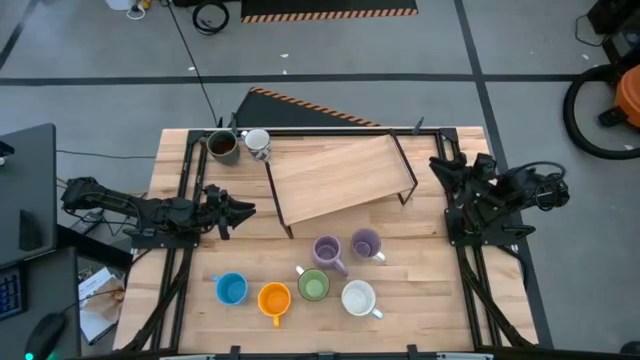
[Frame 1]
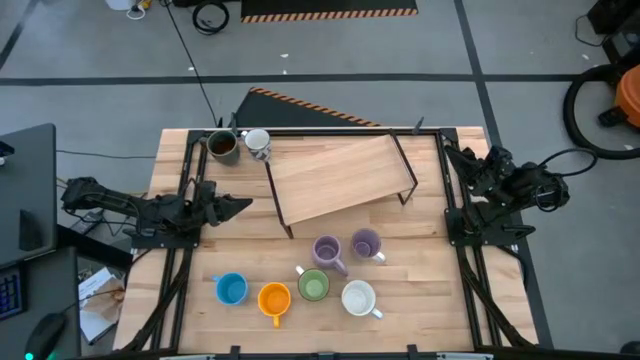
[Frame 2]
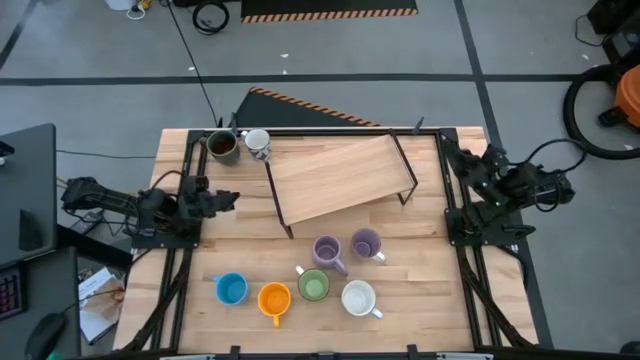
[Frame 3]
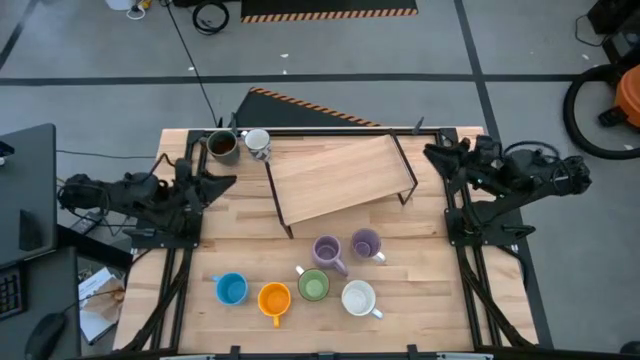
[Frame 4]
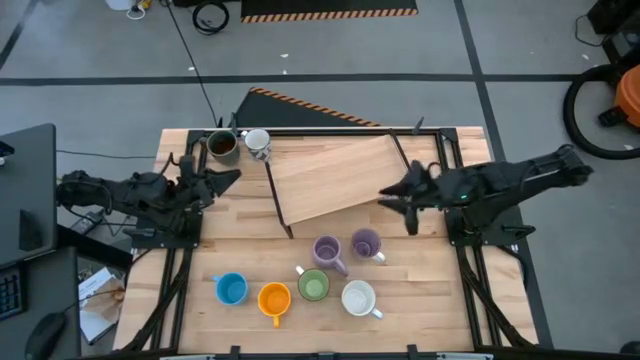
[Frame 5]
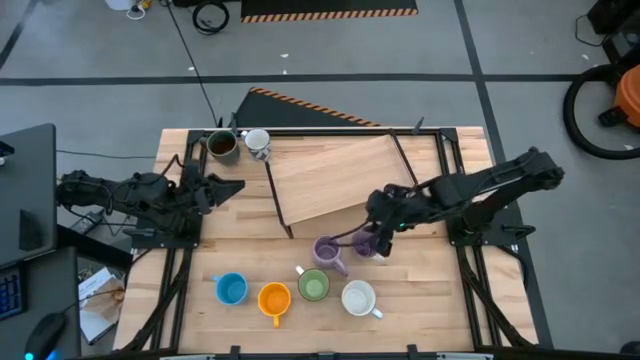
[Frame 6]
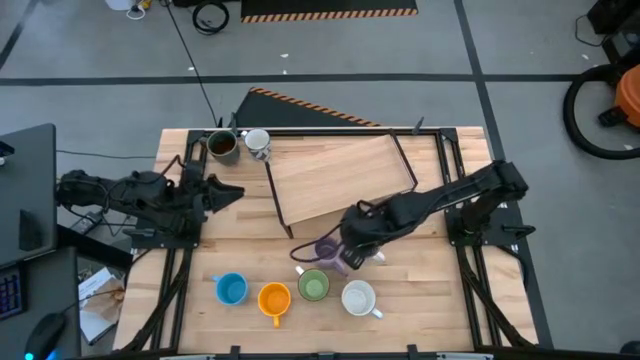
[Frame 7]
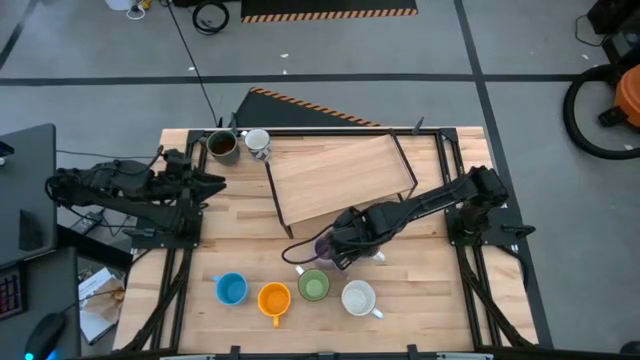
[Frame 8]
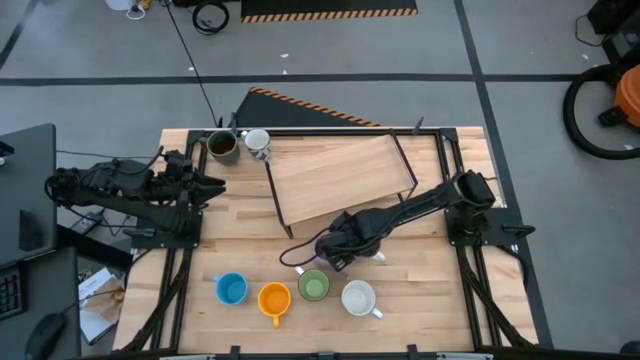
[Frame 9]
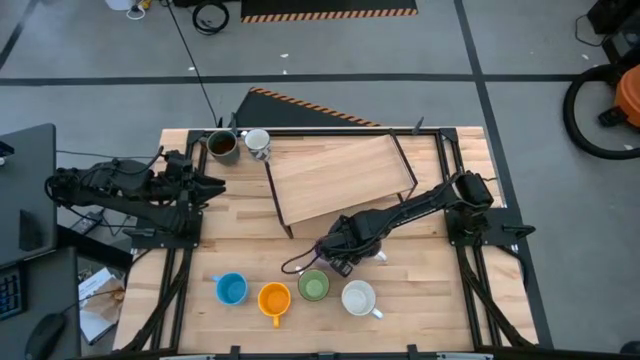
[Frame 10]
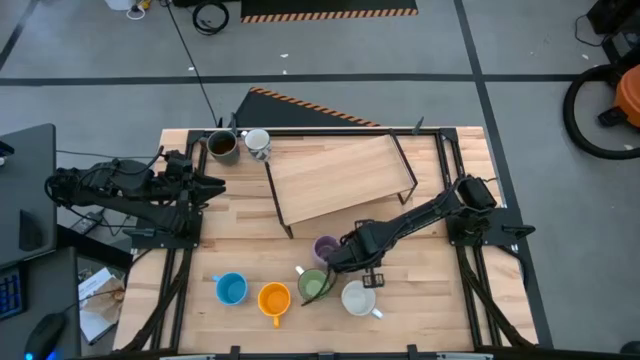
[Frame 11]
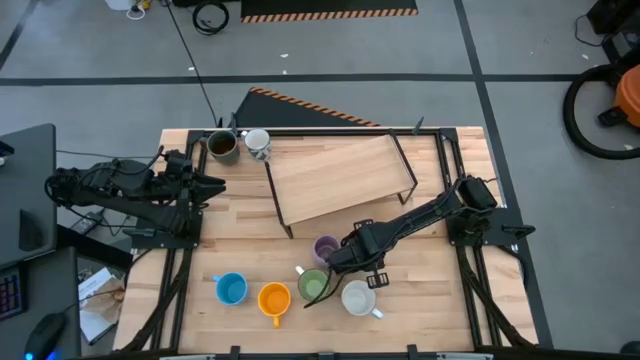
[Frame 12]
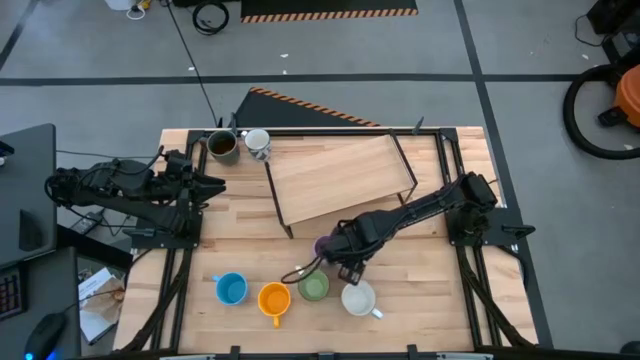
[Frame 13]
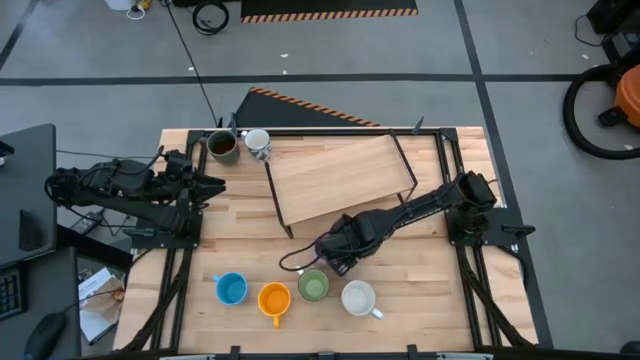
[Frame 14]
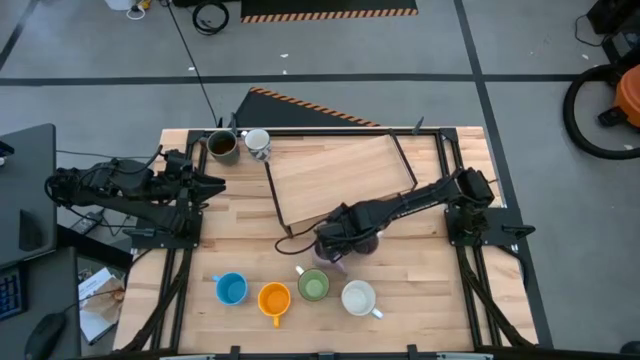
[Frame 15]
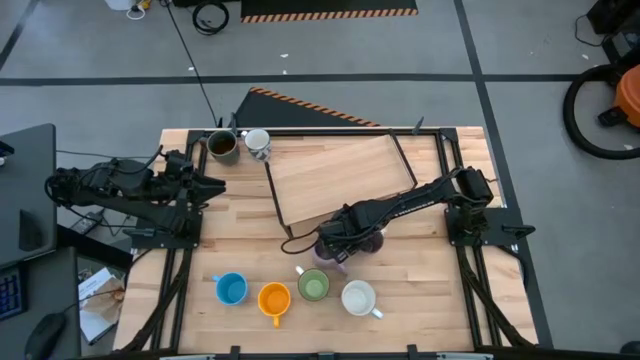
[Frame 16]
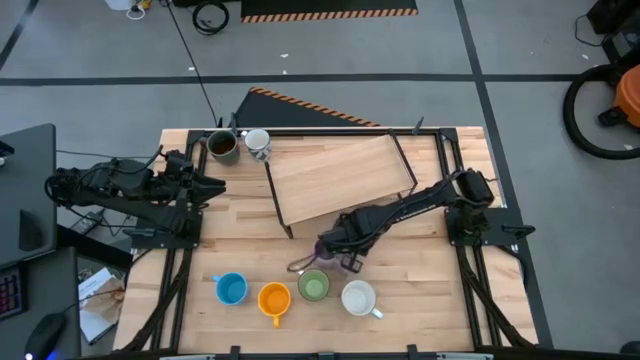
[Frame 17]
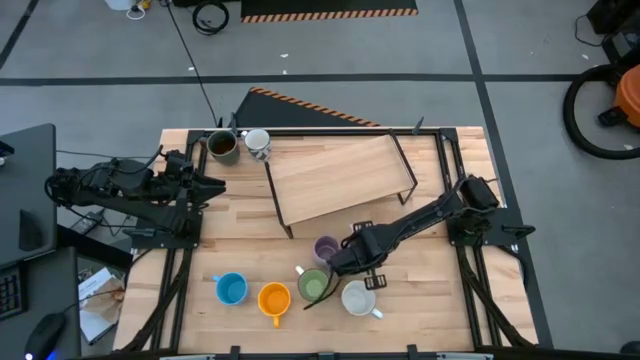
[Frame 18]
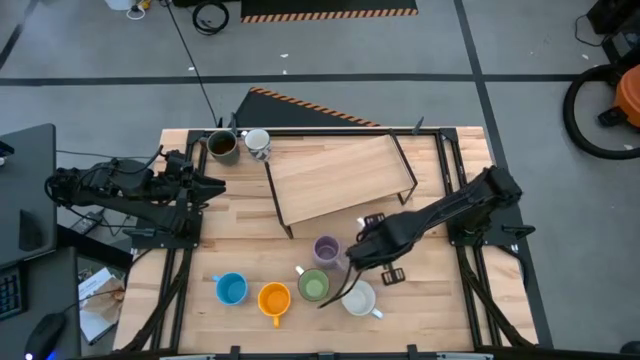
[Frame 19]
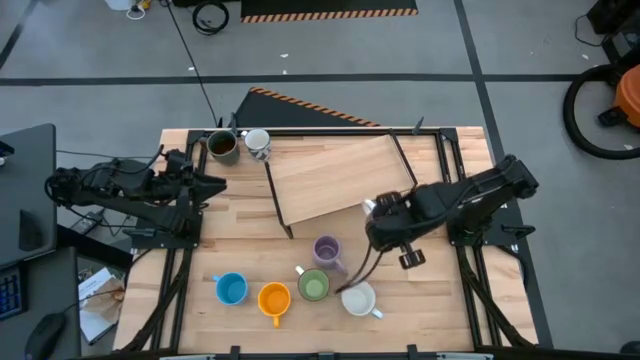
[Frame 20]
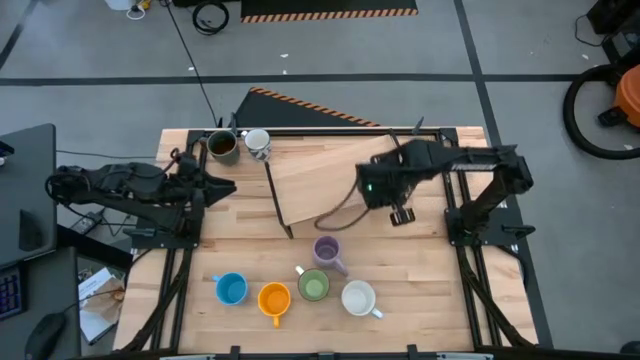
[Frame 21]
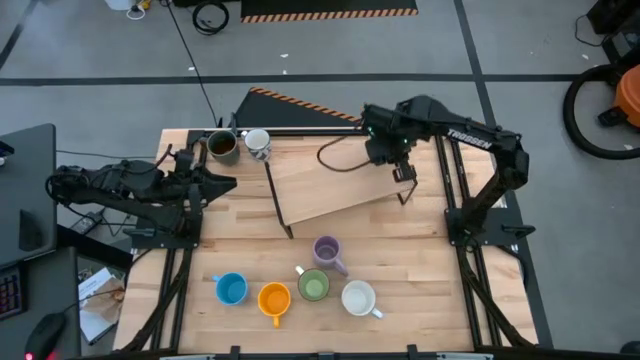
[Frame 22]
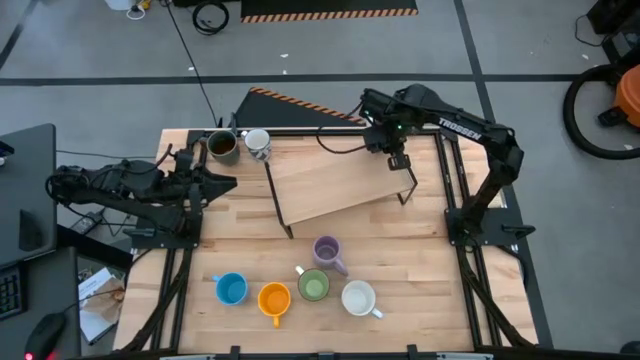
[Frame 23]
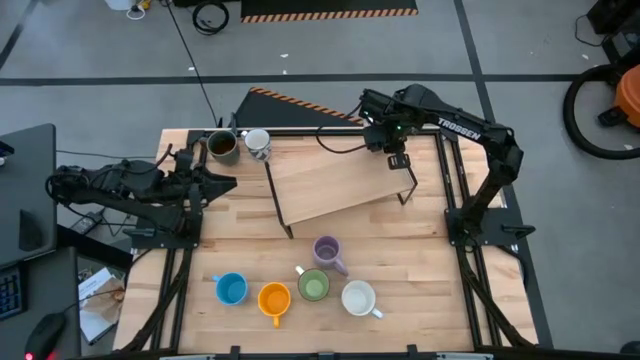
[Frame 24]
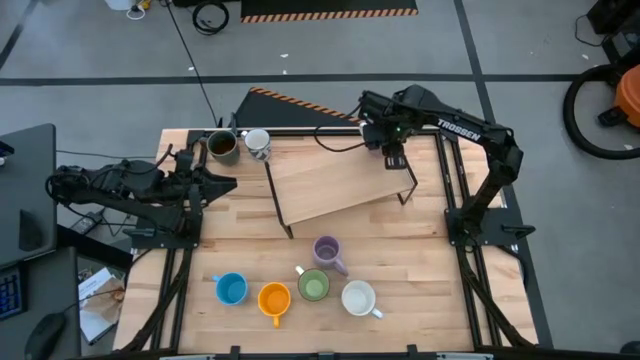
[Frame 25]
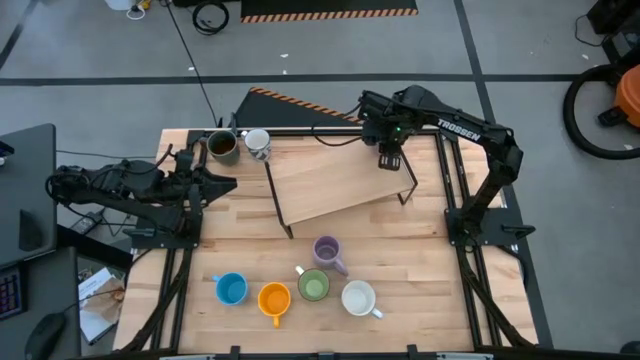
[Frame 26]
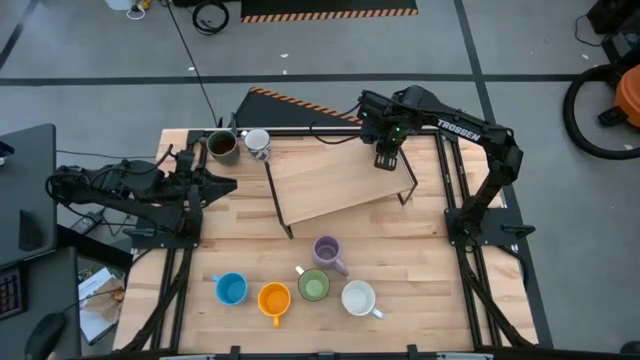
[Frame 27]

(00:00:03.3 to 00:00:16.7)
Task: Place coffee mugs
Put the purple and white mug on the shelf

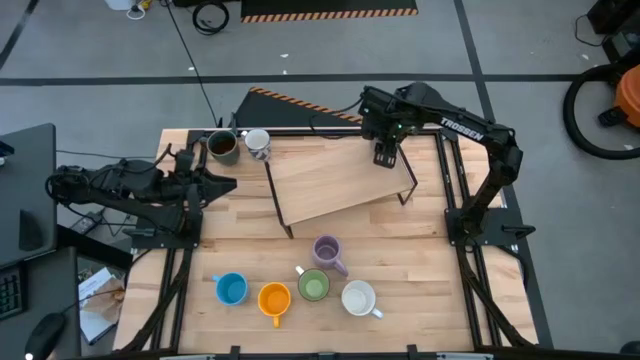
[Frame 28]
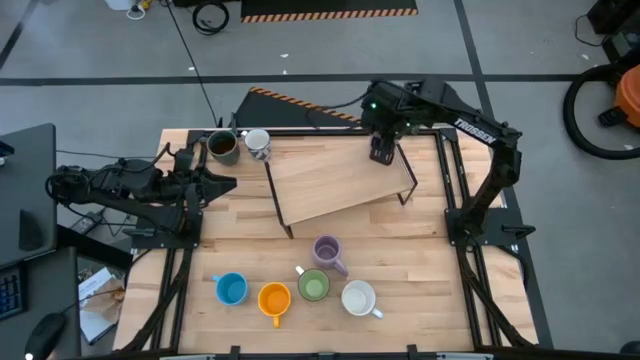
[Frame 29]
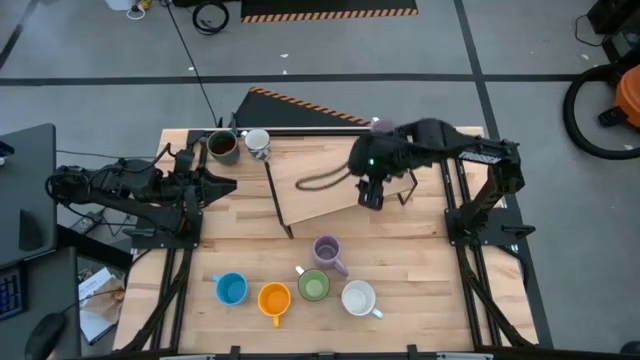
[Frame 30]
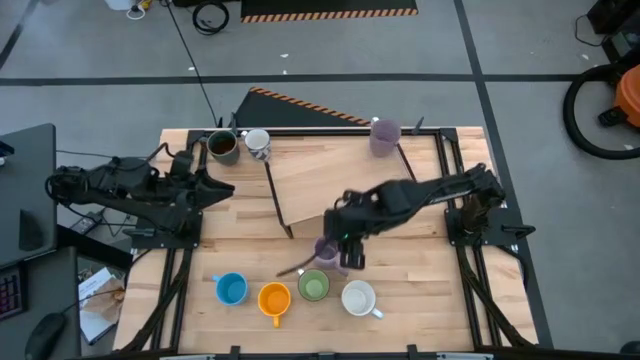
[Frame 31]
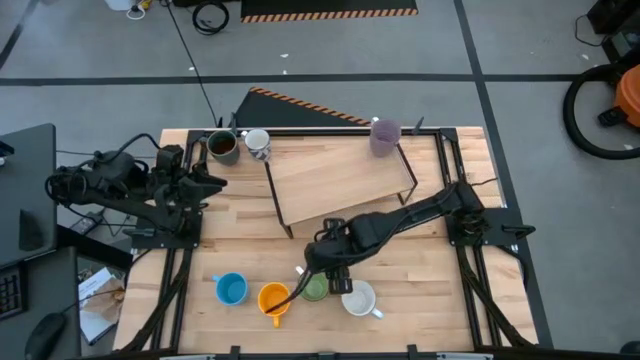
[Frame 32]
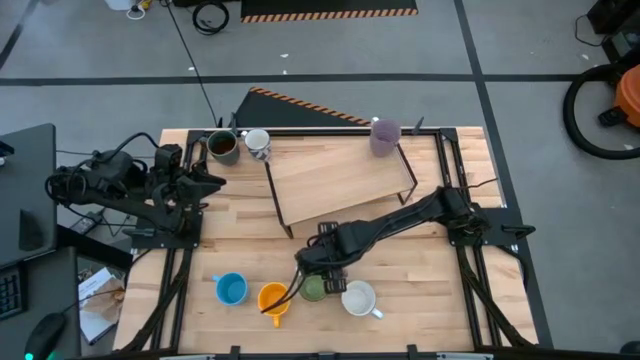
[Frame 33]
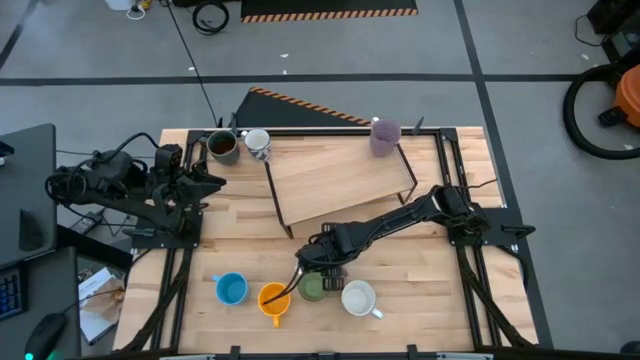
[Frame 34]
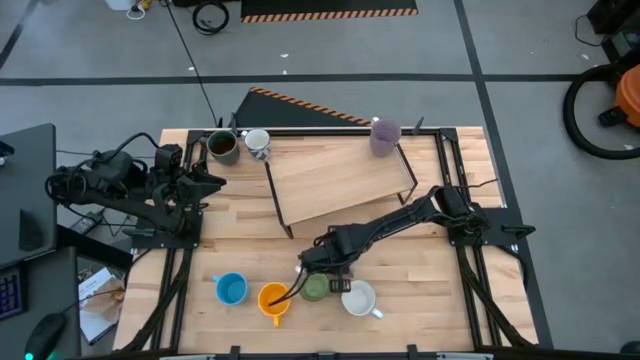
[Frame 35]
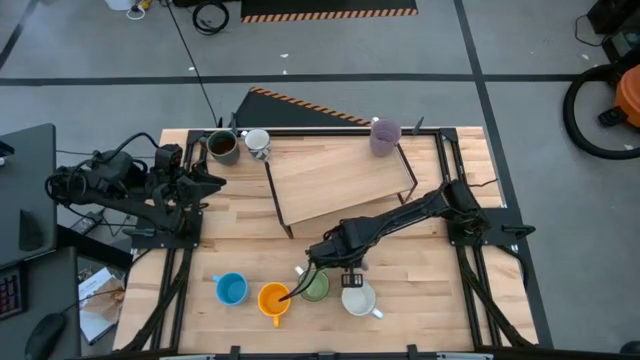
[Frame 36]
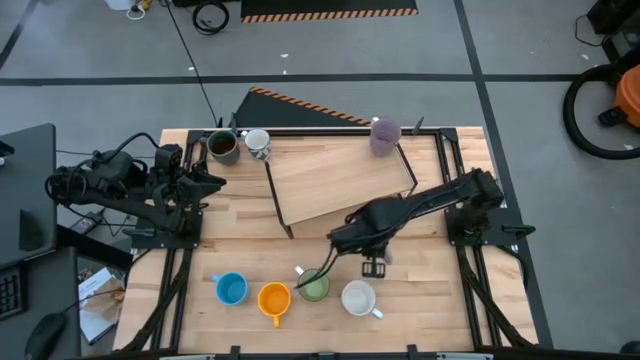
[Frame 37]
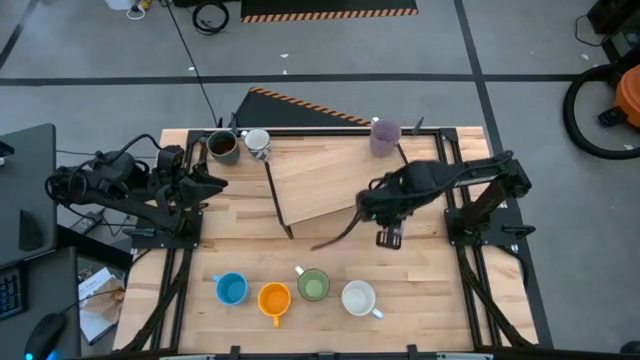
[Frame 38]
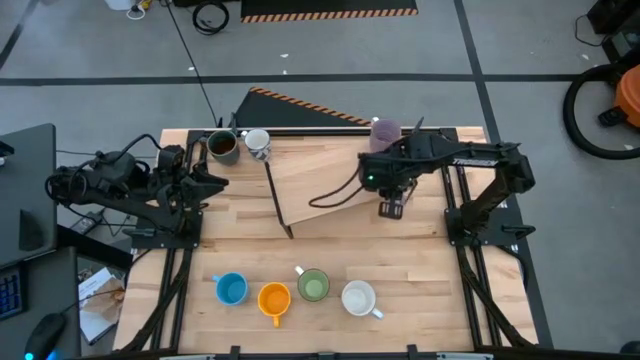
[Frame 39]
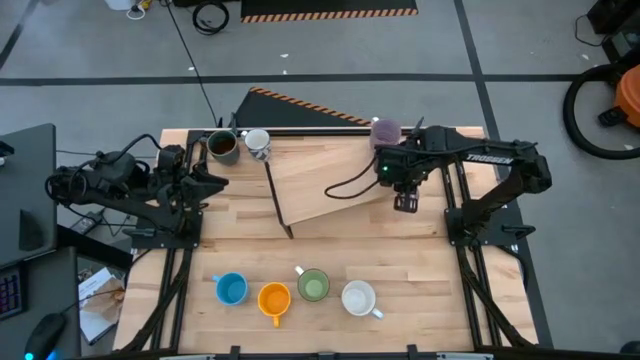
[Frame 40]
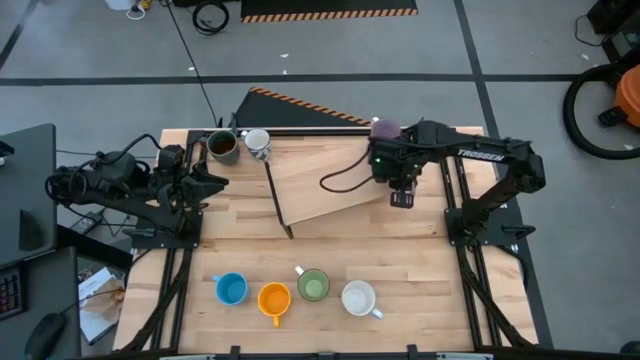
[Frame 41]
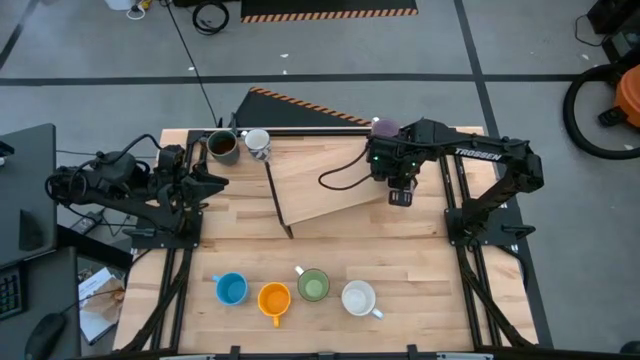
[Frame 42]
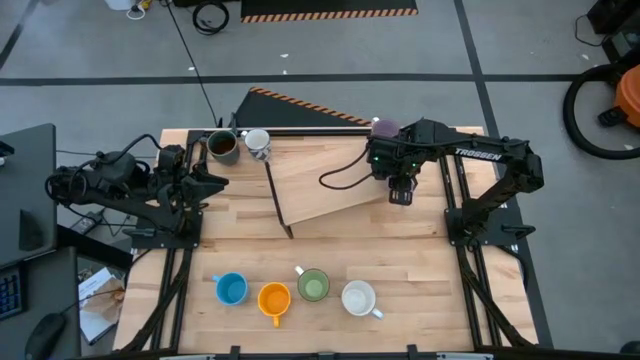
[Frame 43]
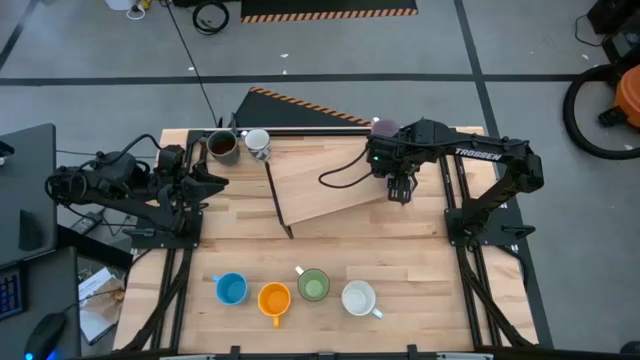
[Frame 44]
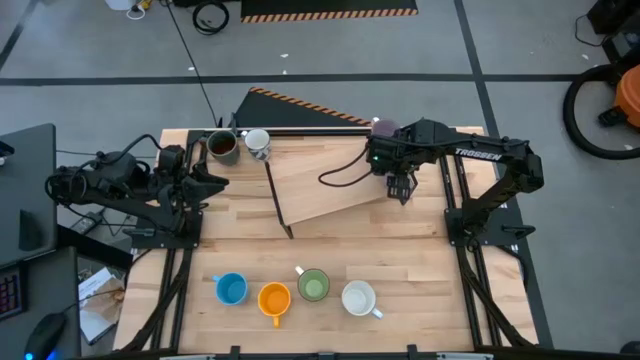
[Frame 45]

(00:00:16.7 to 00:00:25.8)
Put the purple mug on the shelf
